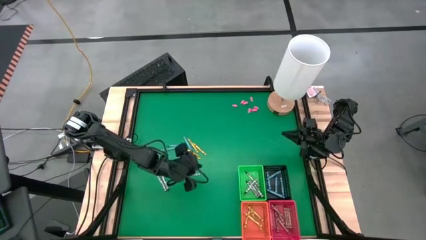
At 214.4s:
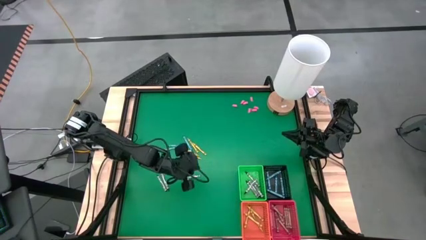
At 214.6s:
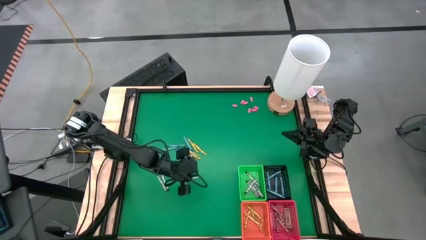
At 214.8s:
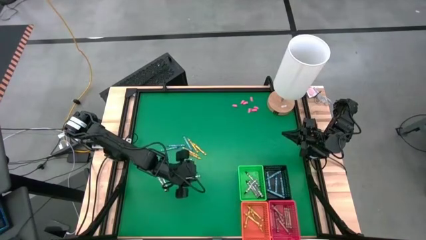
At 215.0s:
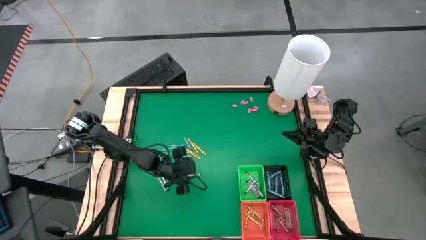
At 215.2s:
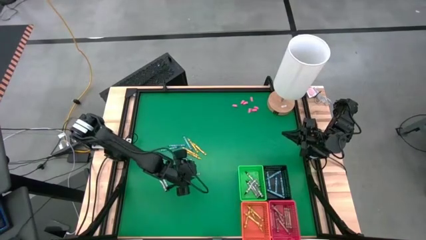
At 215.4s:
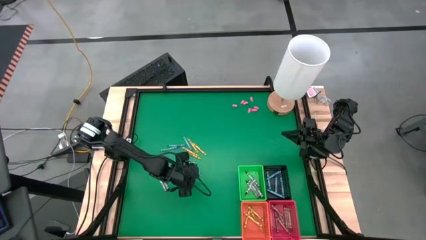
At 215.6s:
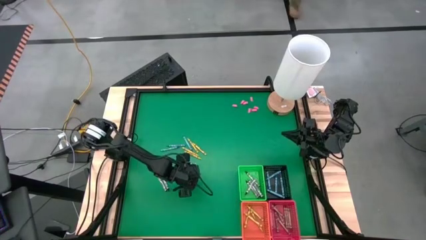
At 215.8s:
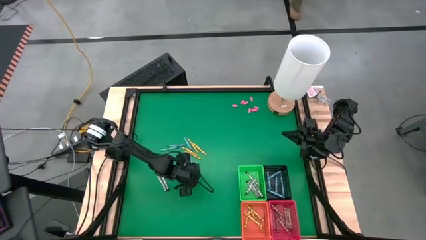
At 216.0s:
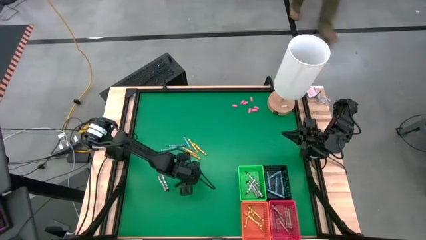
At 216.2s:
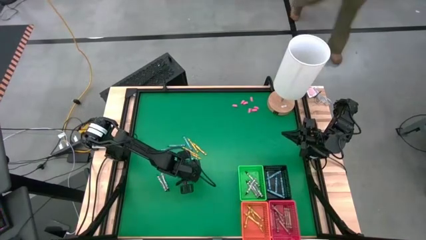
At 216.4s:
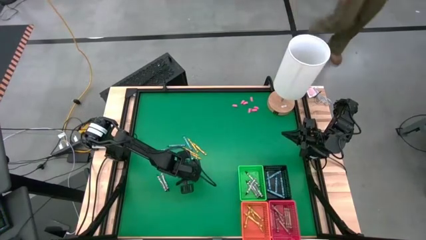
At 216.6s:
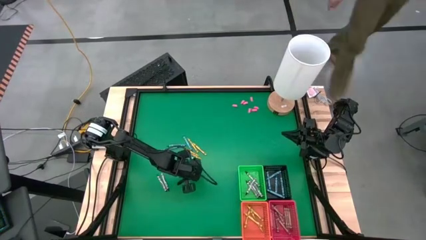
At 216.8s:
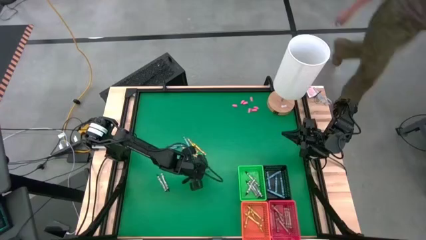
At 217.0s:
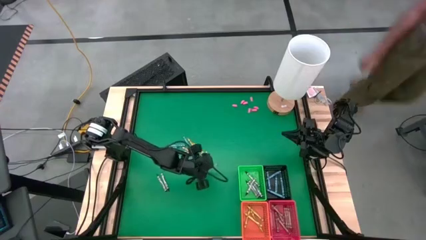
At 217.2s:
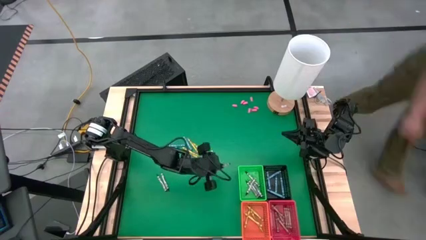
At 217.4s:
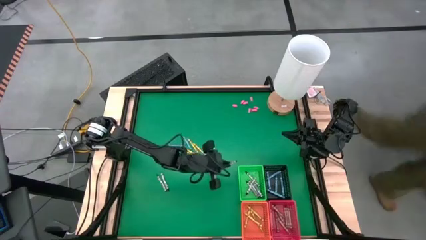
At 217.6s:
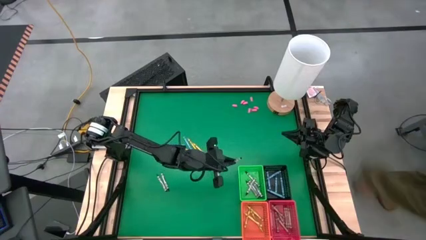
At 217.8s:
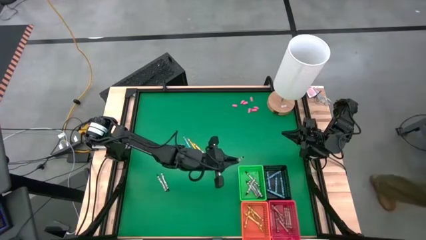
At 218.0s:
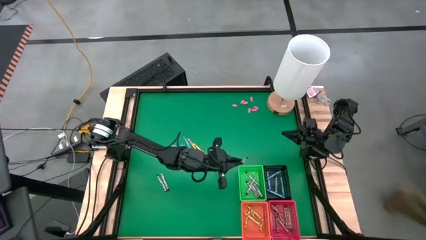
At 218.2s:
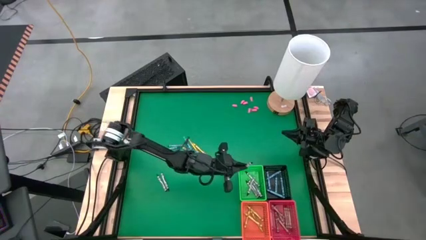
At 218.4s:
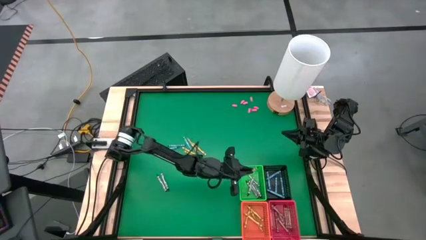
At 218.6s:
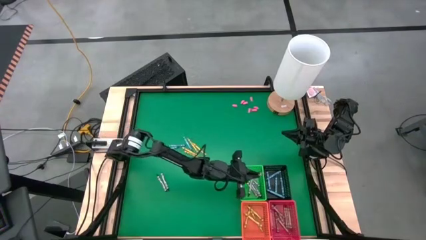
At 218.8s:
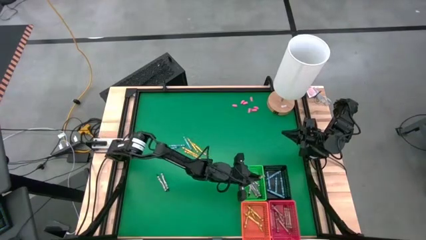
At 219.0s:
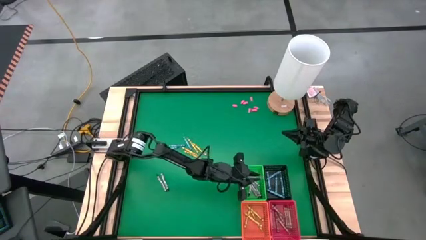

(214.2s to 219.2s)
Task: Sort crayons
Put the black crayon into the green bin

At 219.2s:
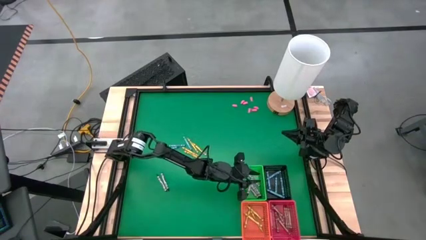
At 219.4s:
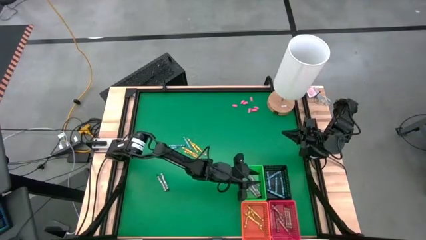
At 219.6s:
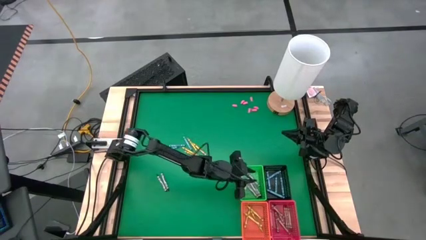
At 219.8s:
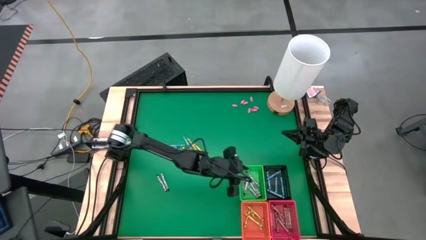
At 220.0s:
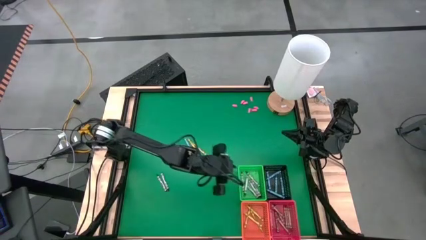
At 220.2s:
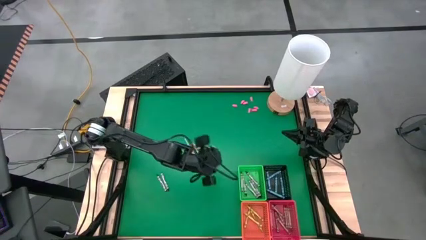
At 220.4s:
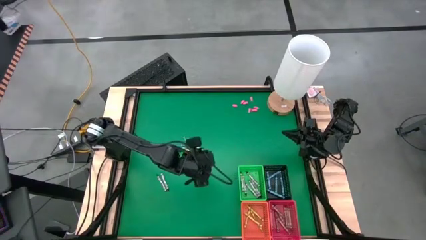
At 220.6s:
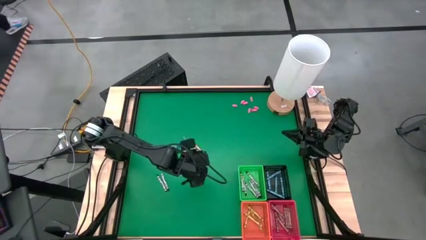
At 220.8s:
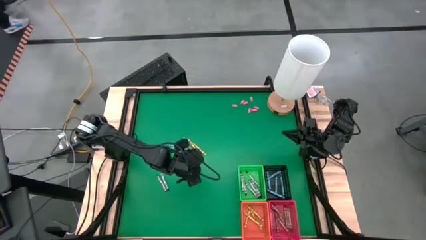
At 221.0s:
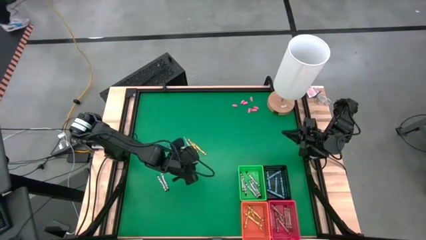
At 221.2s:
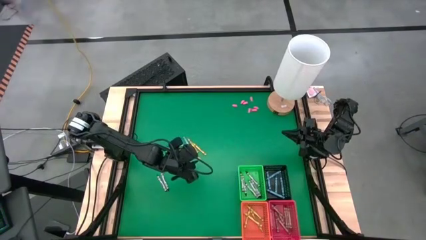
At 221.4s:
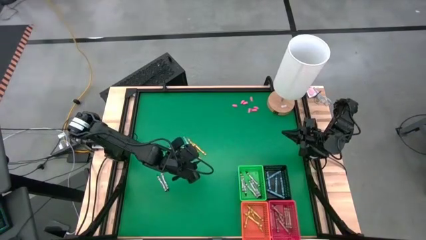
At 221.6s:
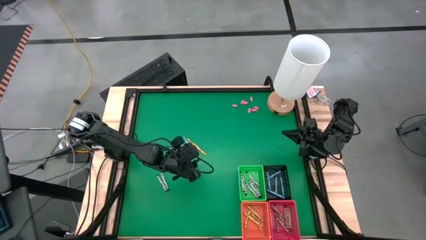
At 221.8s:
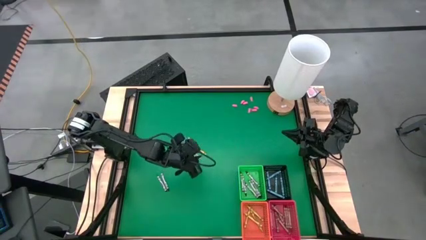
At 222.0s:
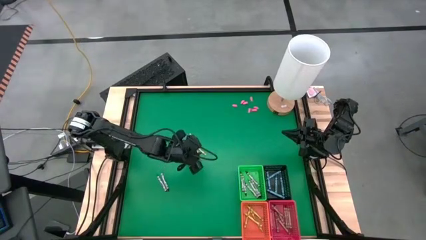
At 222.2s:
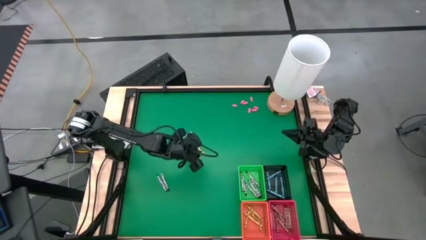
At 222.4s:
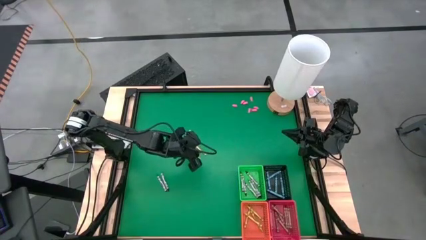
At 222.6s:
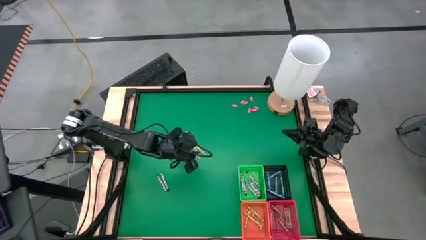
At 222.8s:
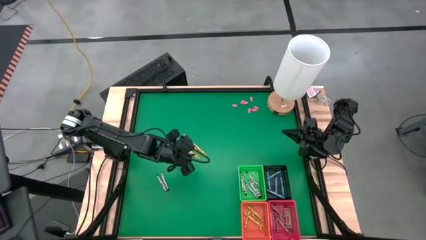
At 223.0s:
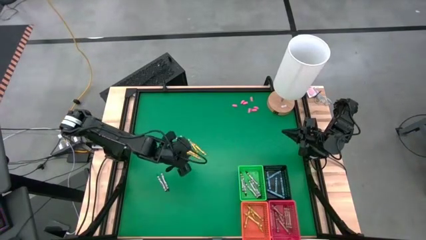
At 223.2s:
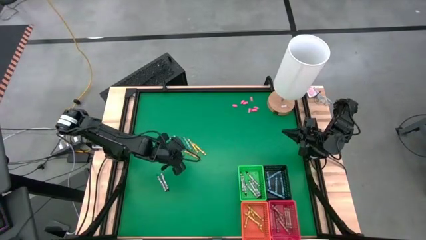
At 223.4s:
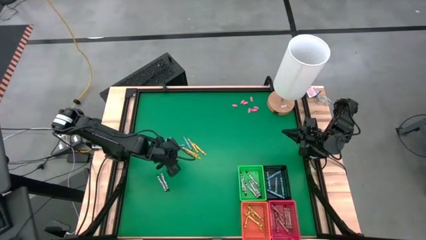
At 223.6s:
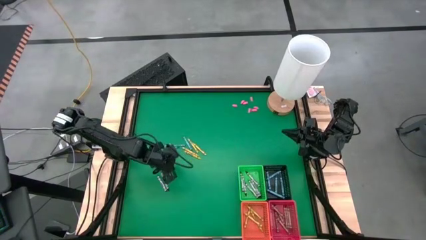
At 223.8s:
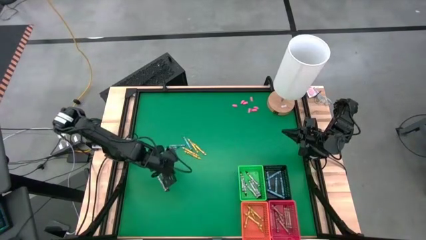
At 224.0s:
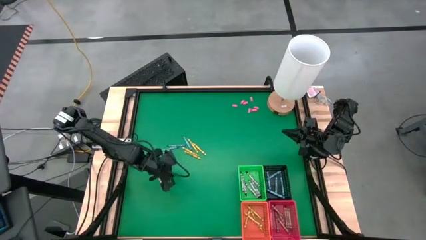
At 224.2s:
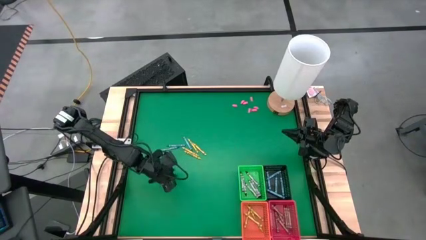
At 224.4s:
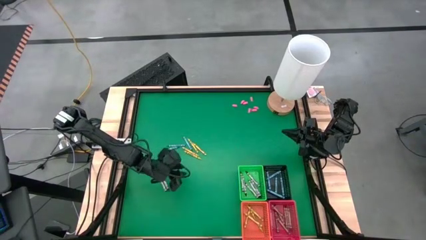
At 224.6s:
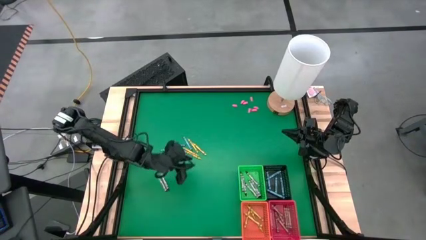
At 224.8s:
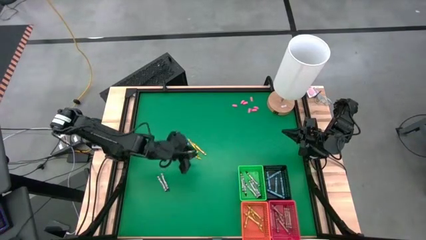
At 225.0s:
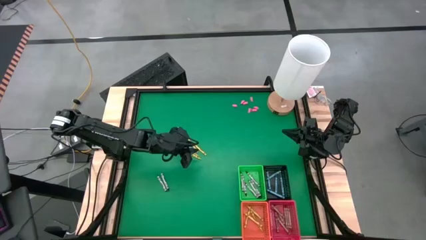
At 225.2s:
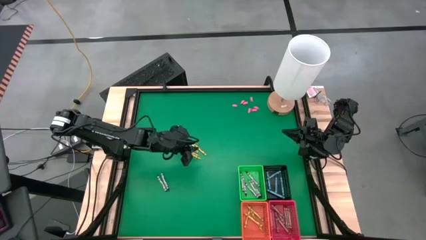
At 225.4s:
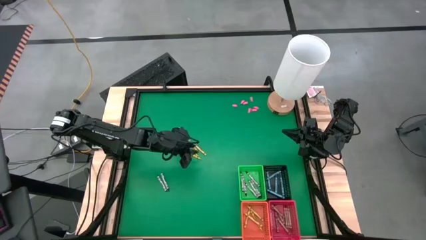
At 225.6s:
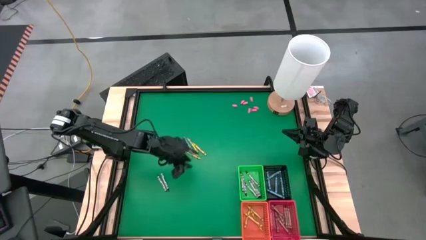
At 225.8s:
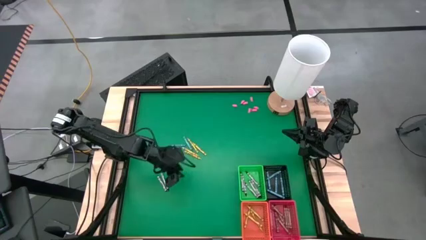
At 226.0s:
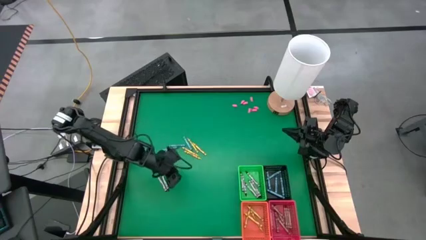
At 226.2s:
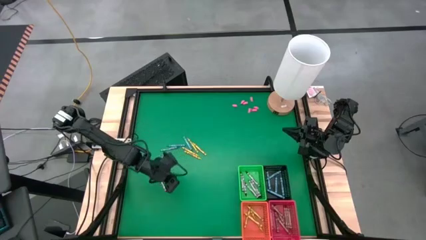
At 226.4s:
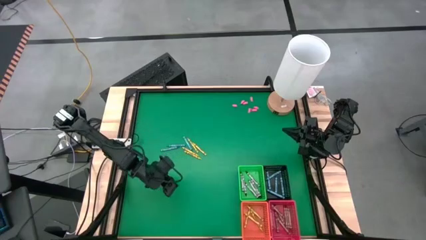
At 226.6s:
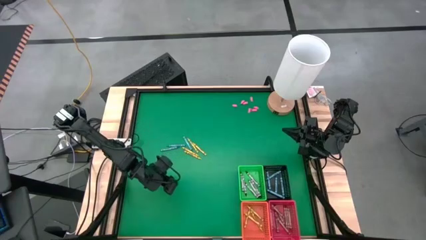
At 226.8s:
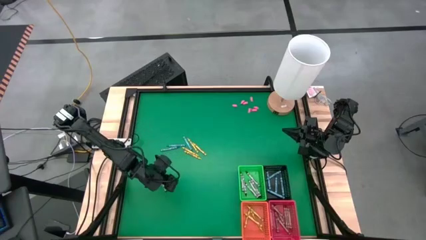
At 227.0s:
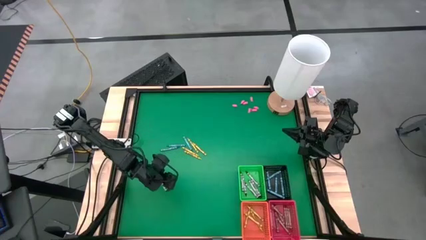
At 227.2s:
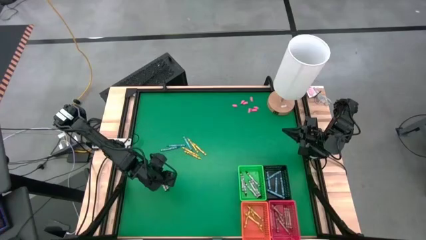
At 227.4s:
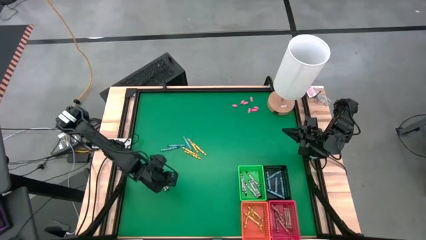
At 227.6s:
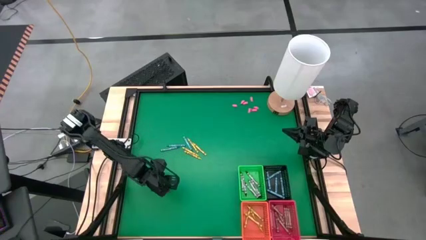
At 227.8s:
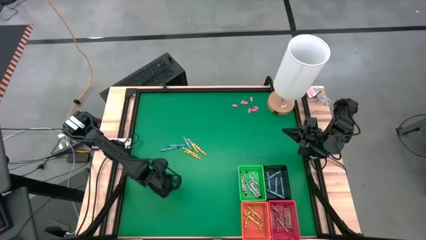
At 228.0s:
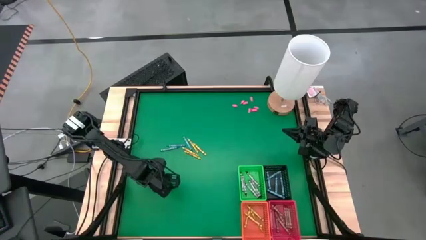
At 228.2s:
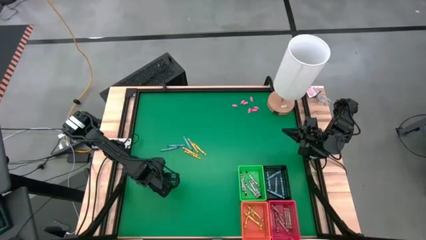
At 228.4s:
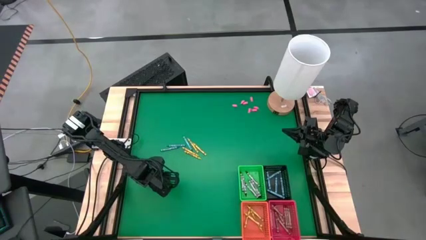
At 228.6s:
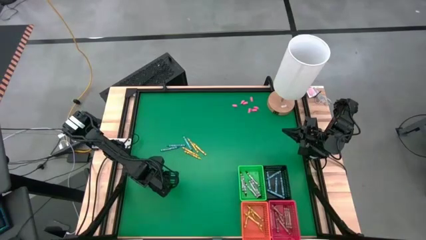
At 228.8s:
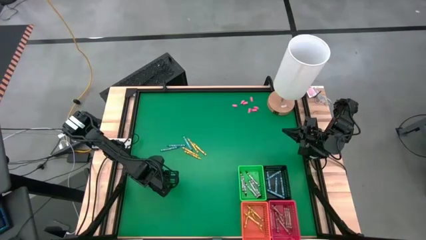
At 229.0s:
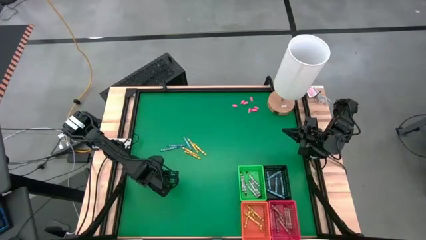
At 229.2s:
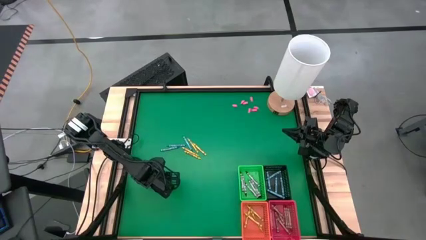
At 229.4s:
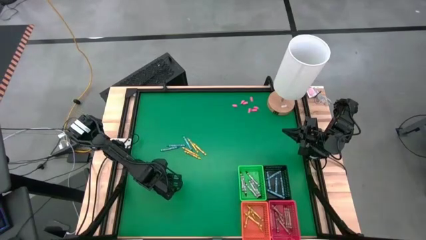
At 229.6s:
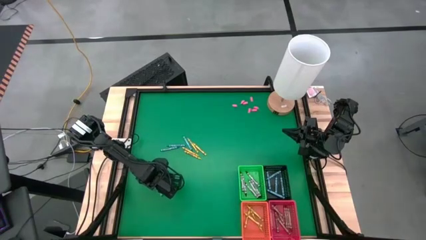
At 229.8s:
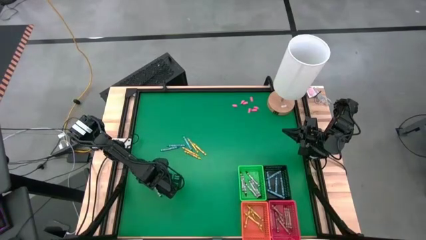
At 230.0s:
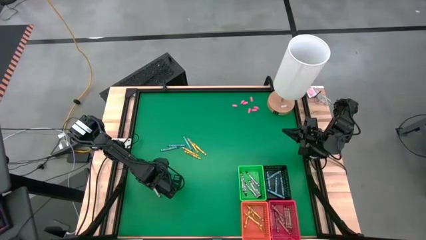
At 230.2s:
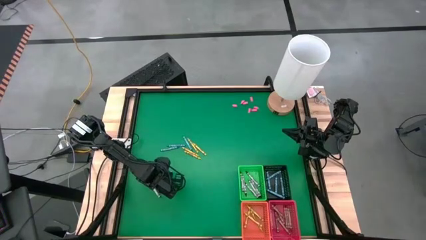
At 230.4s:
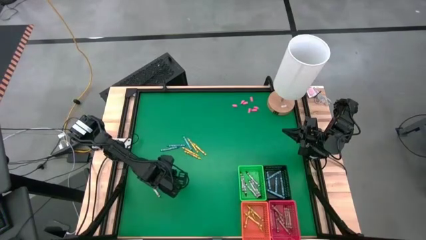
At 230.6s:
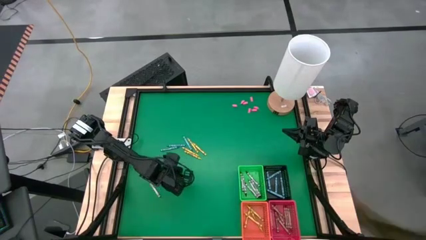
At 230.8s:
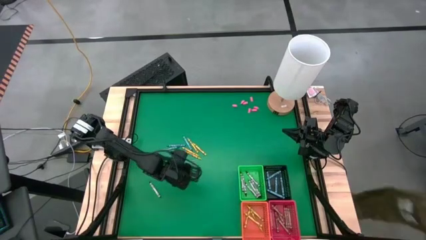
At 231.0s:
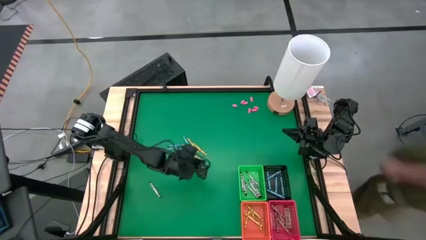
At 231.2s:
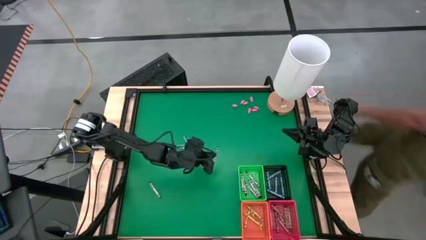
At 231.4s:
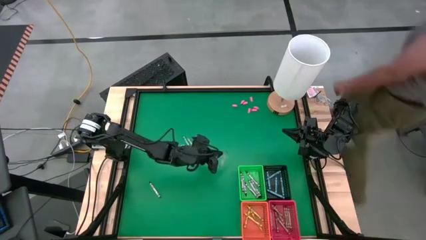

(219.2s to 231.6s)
Put the black crayon into the green bin

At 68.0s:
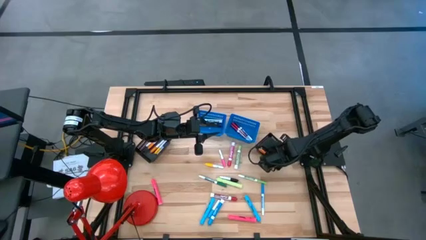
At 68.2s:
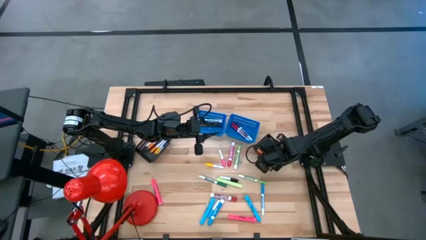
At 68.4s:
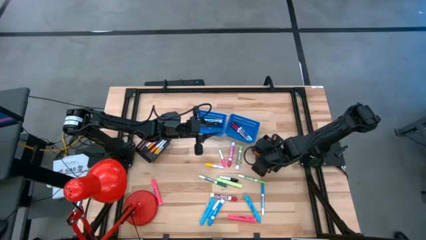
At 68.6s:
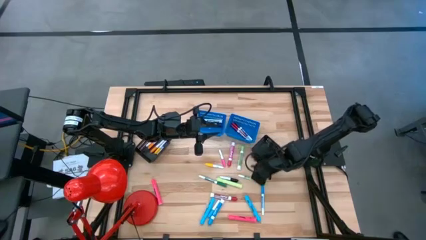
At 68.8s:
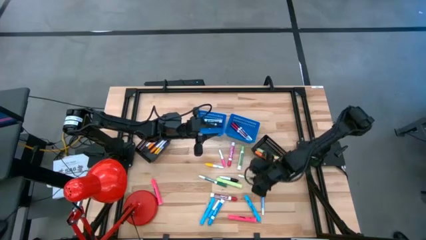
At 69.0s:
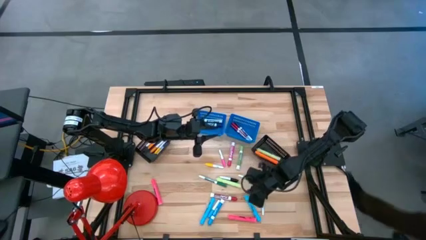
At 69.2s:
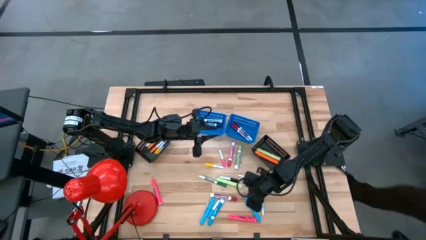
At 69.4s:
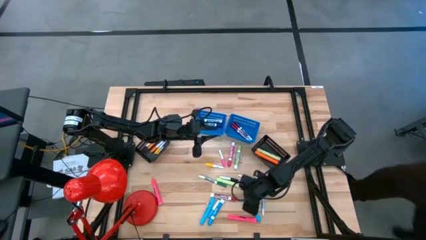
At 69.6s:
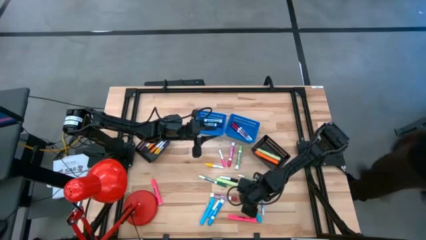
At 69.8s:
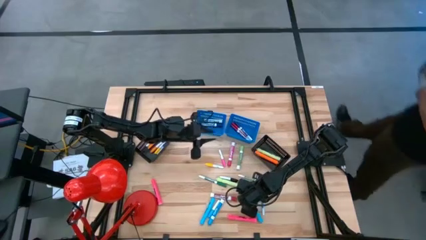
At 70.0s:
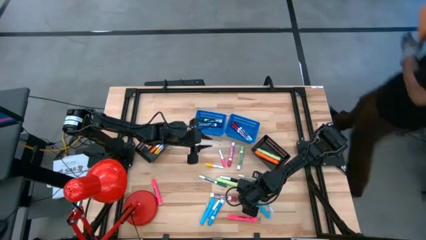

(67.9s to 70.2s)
Task: Pick & Place Markers
Put the light blue highlighter into the right black bin
